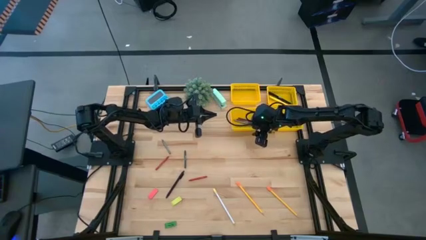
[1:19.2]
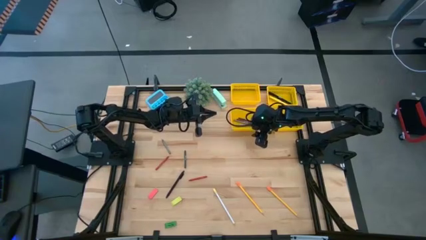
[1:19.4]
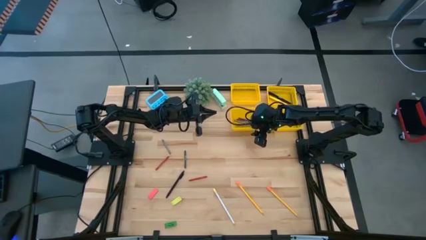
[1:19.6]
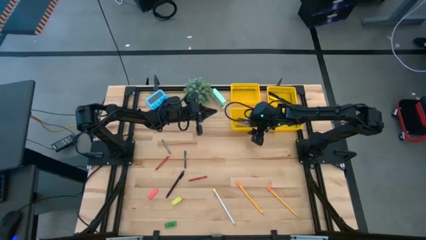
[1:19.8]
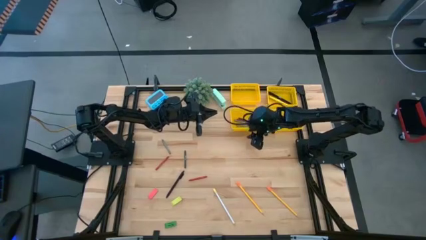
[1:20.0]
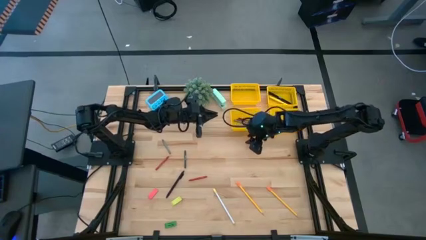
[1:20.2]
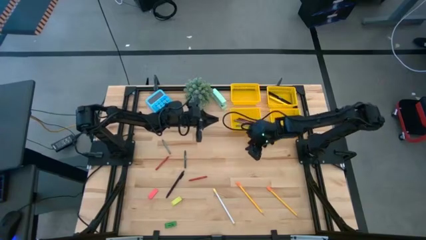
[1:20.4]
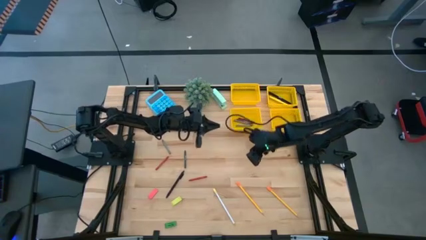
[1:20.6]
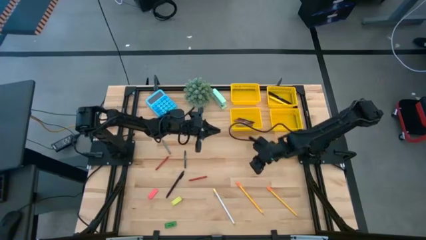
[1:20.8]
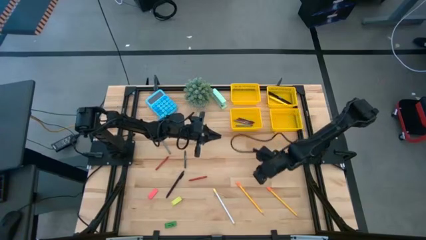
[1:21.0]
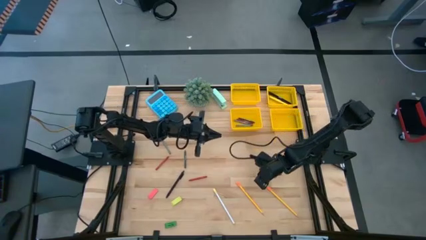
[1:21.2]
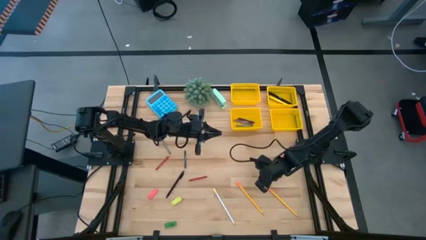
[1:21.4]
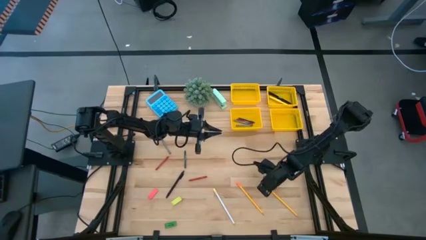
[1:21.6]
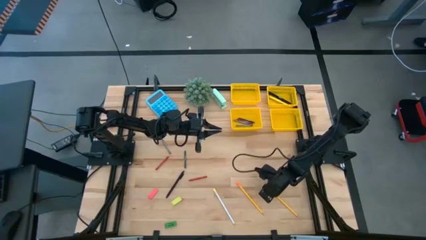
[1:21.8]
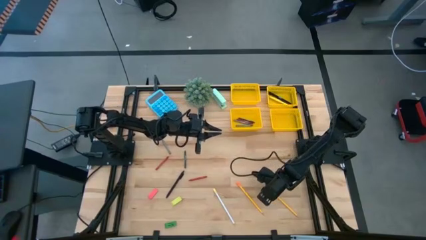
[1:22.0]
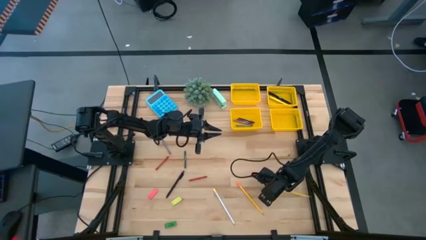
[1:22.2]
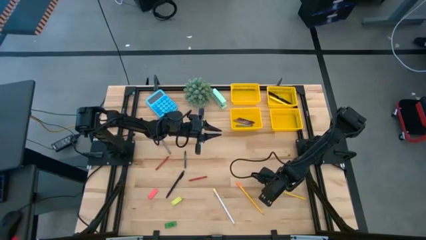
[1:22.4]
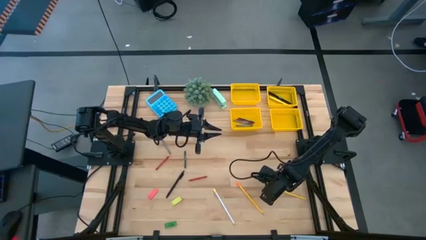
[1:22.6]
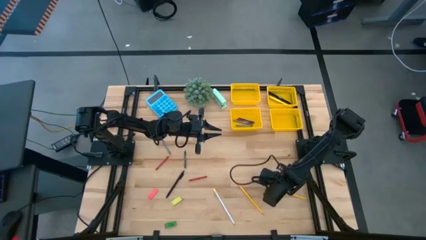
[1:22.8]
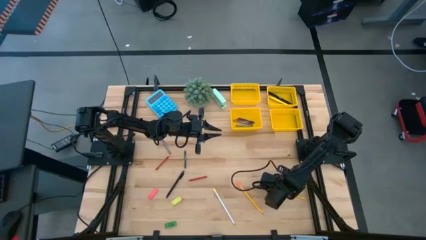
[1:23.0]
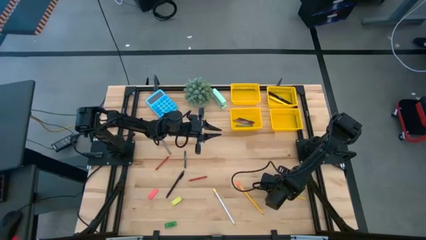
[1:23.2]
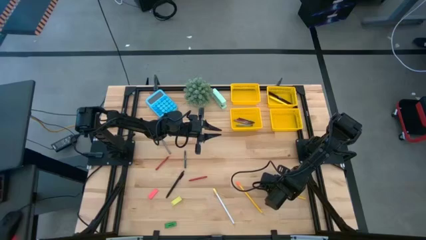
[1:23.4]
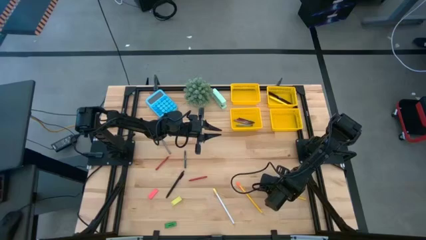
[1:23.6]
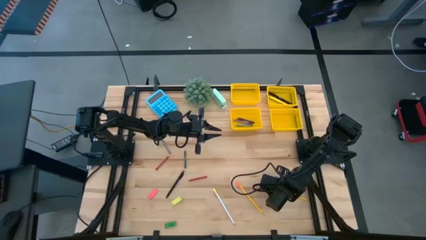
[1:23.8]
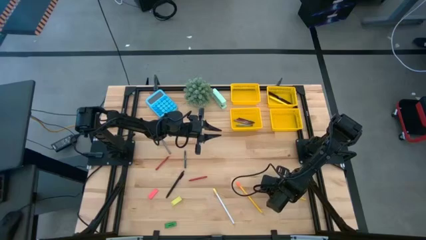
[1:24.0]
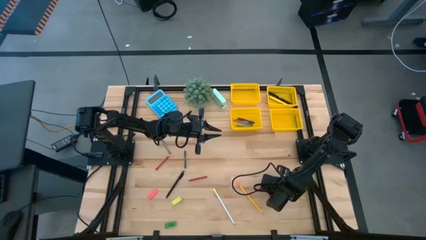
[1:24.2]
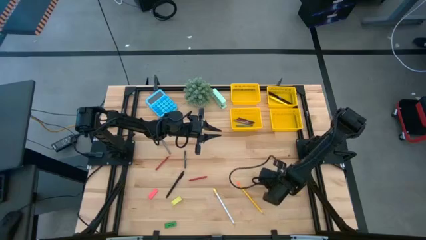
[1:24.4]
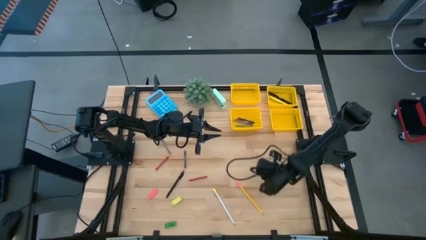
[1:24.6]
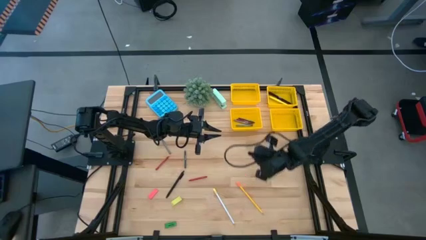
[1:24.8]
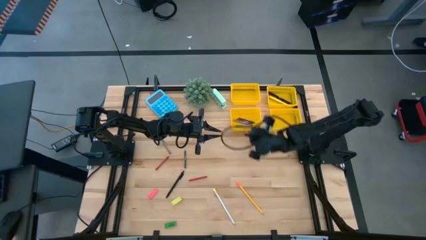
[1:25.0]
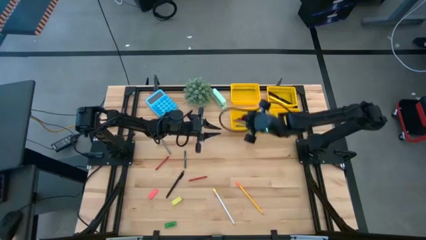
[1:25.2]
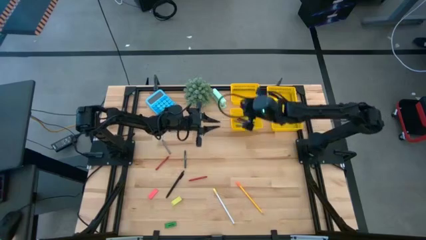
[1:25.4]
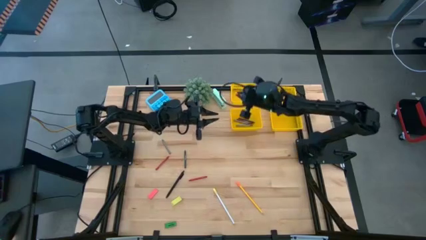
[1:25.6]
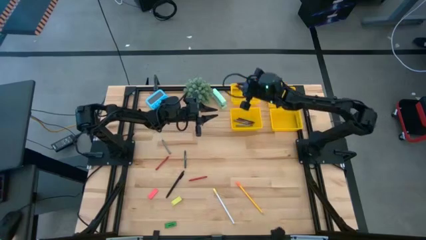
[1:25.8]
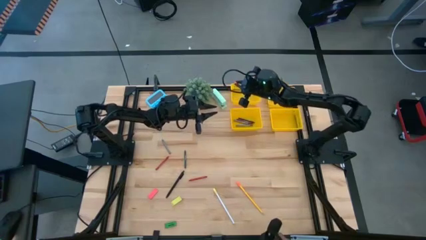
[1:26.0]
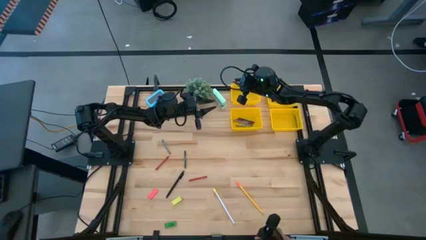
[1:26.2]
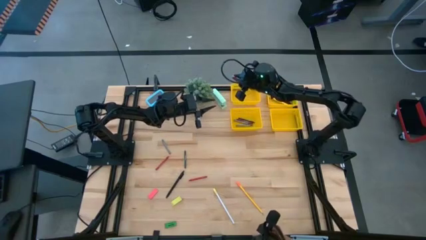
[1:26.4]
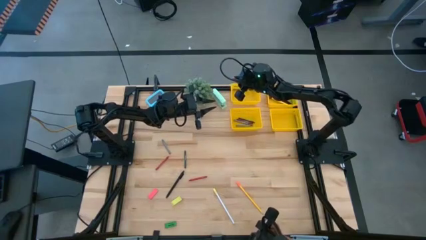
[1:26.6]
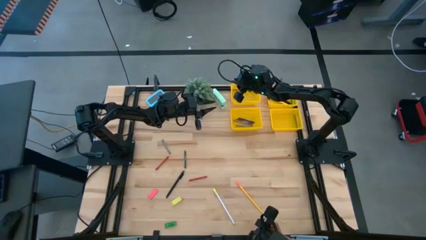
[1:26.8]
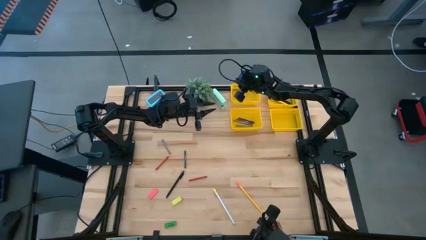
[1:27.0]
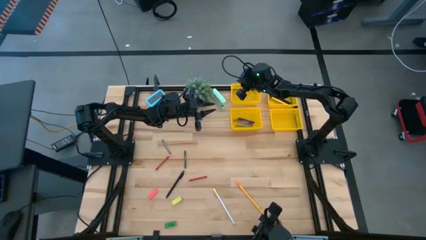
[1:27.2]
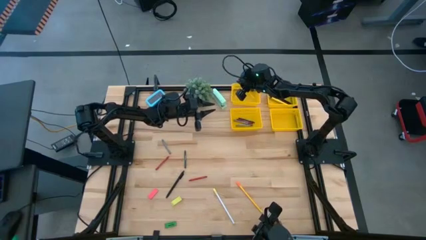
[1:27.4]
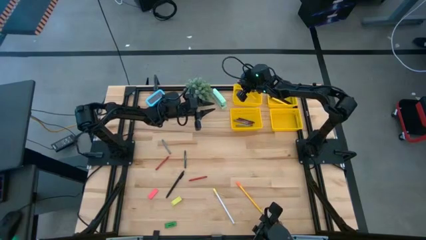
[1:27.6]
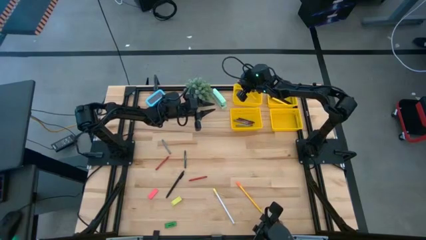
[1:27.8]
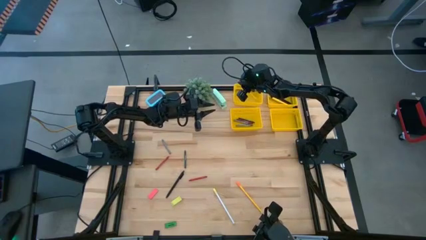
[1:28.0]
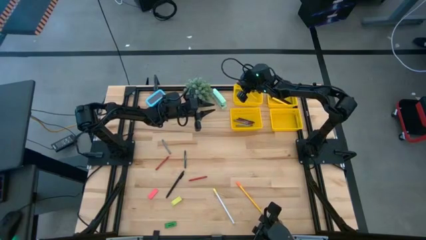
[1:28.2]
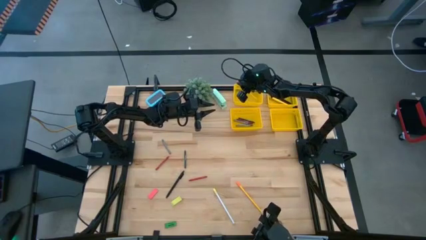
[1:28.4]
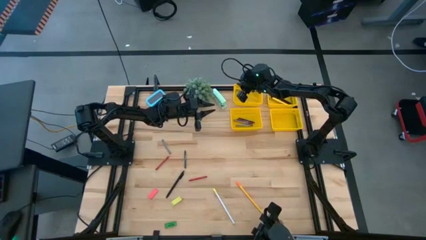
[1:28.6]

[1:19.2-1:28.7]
Task: Sort crayons/erasers/pens/pencils in bins
Put the yellow pencil into the top left yellow bin

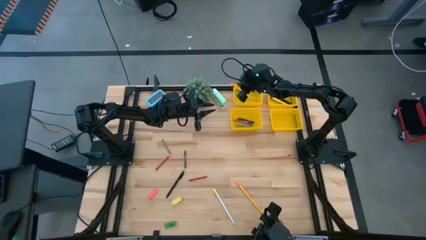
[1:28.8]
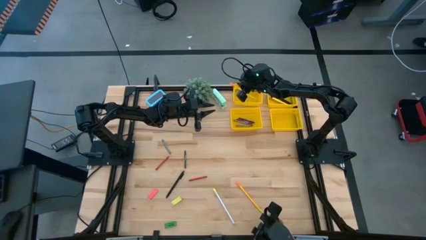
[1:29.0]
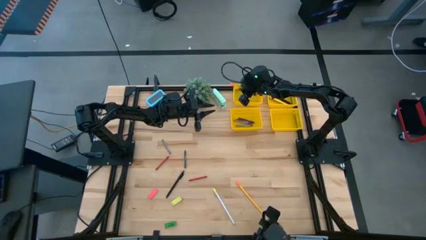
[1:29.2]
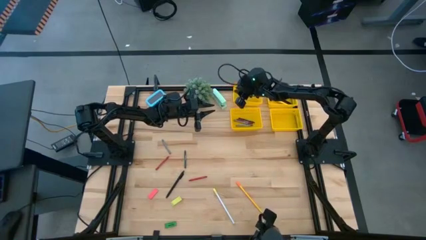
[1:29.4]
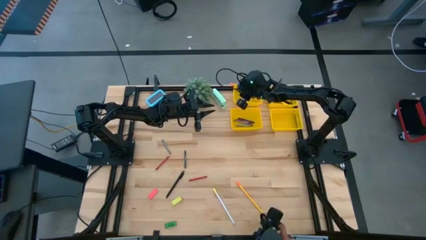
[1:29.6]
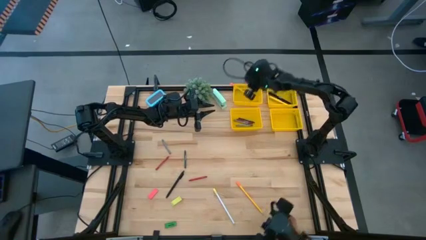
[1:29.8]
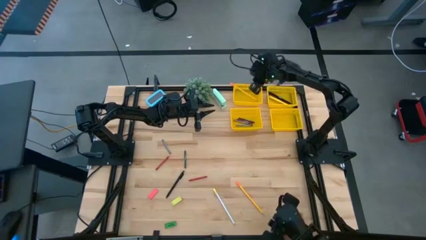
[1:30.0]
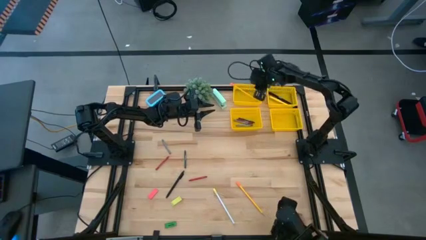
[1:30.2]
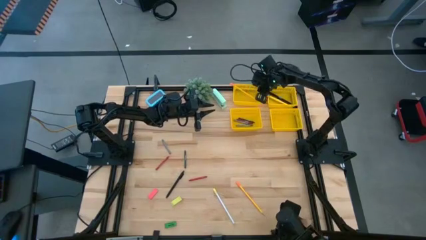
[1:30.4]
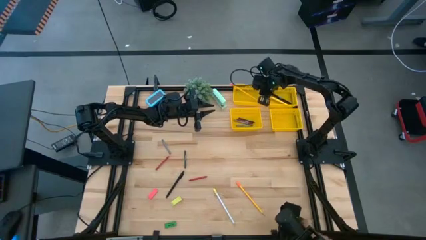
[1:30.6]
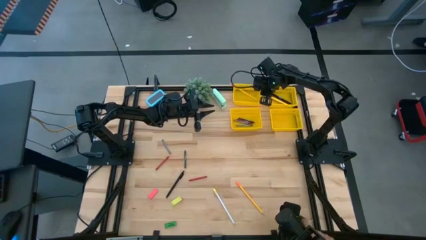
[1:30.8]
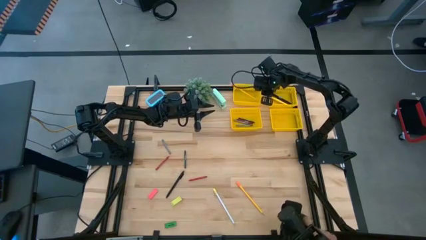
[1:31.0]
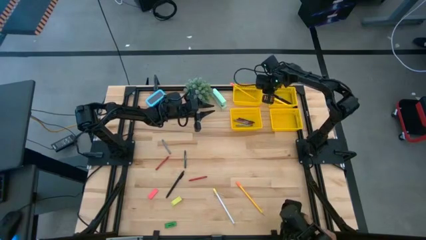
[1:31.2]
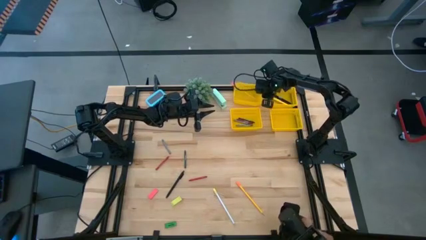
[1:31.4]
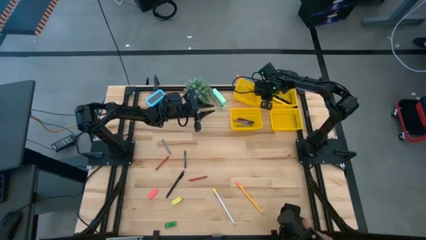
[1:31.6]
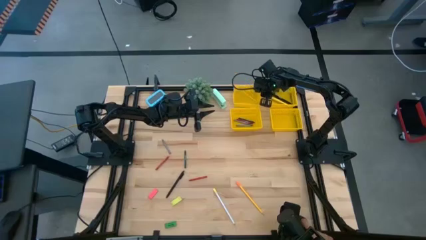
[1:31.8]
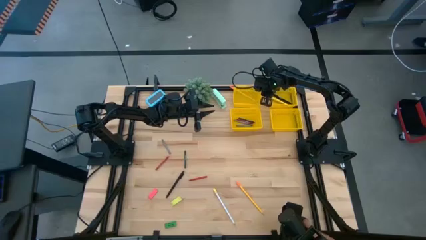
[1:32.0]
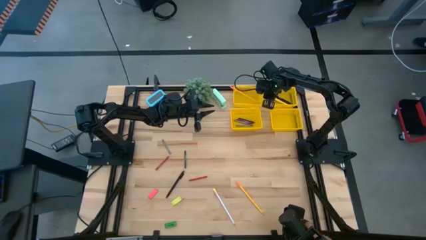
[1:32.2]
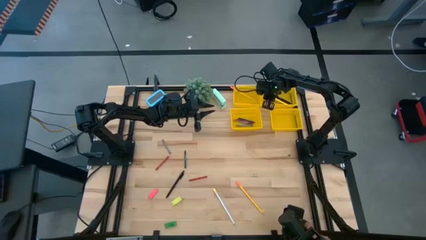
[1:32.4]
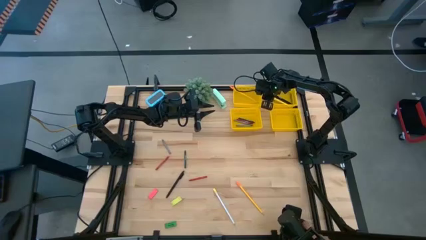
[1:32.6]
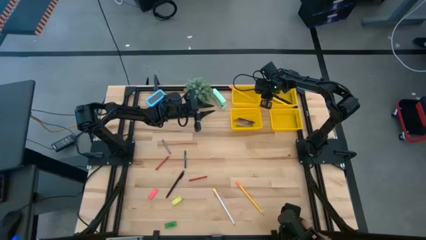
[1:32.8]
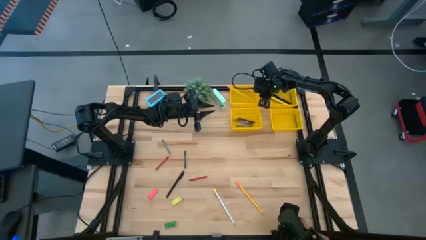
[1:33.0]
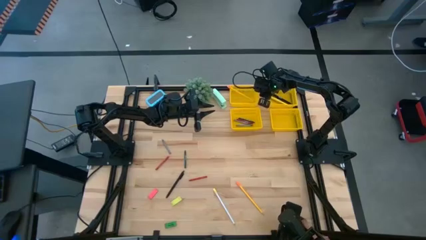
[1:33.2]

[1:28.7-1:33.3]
Adjust top left yellow bin
